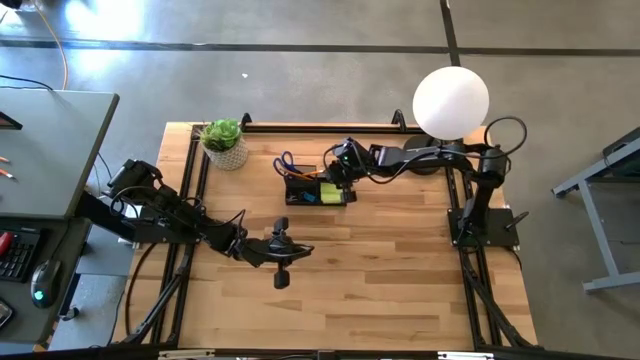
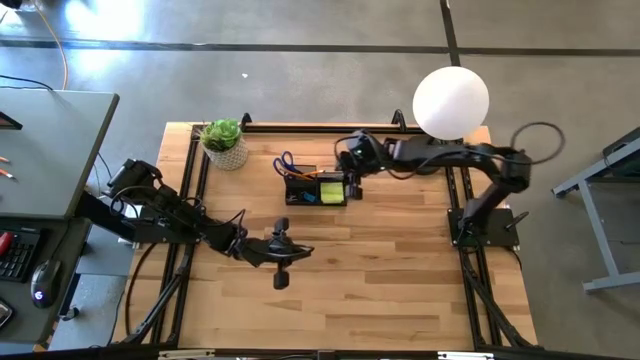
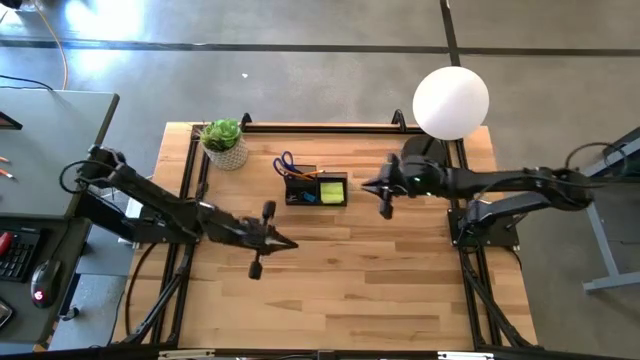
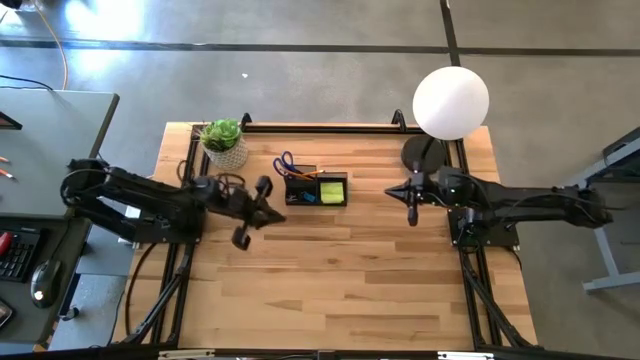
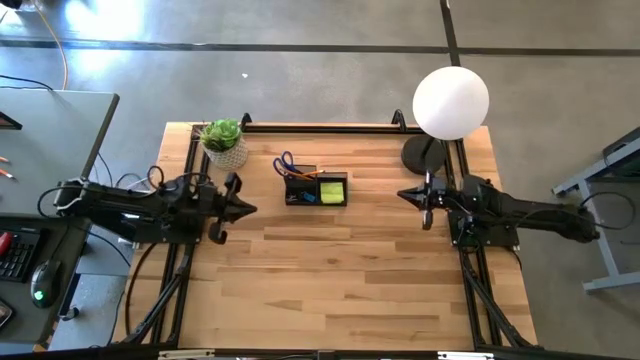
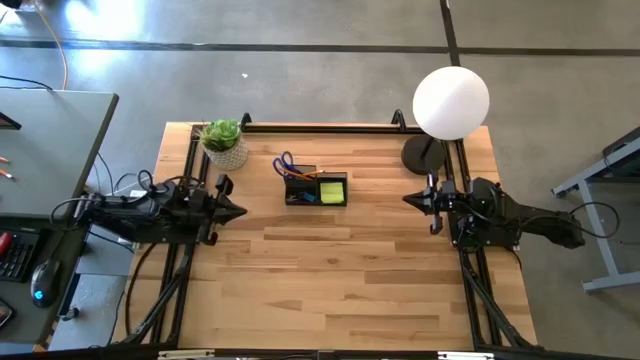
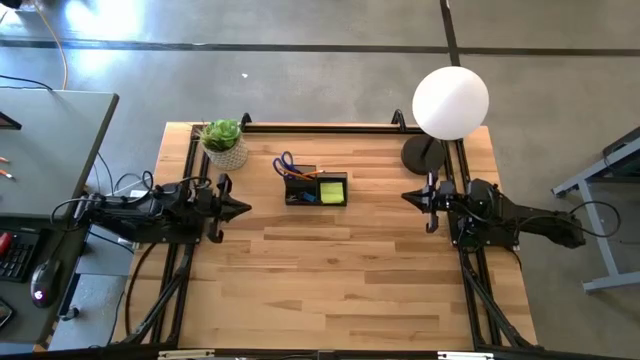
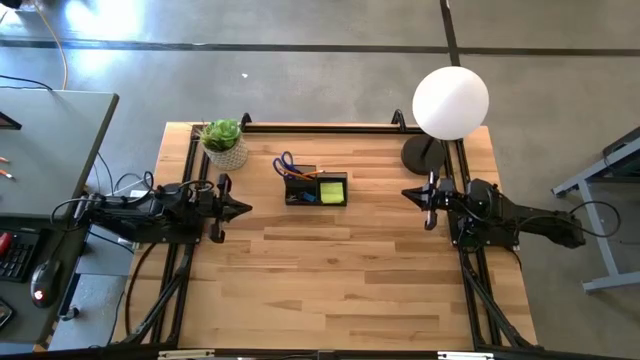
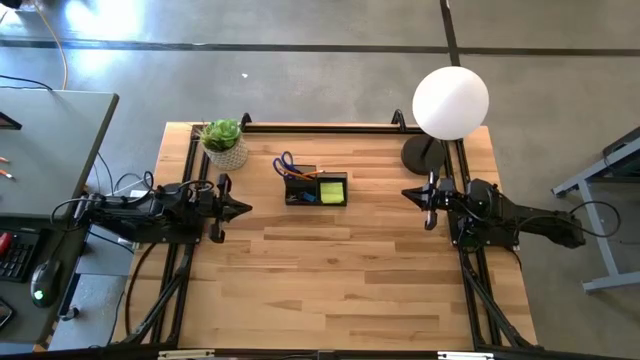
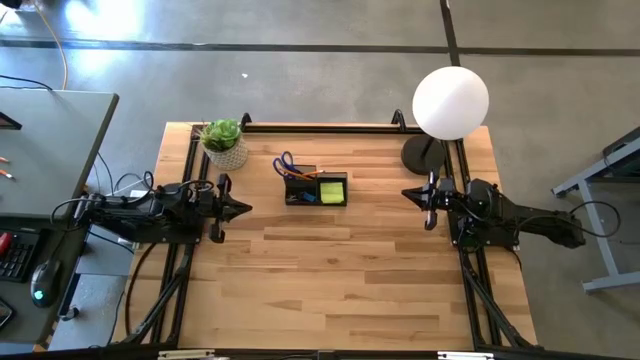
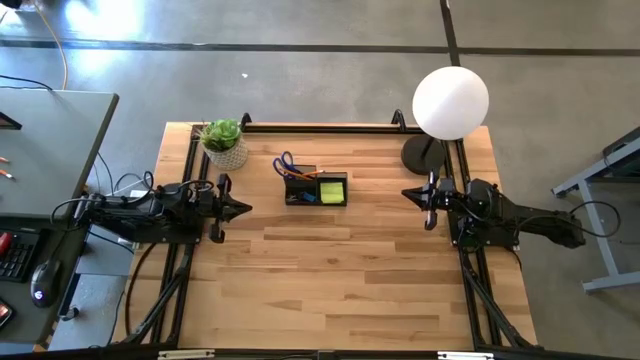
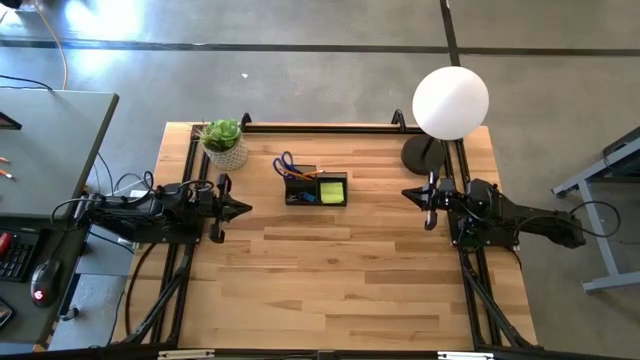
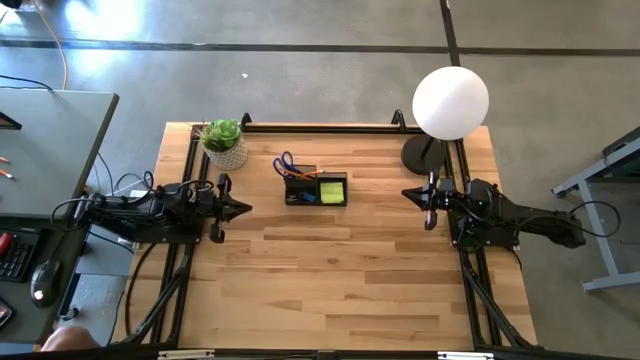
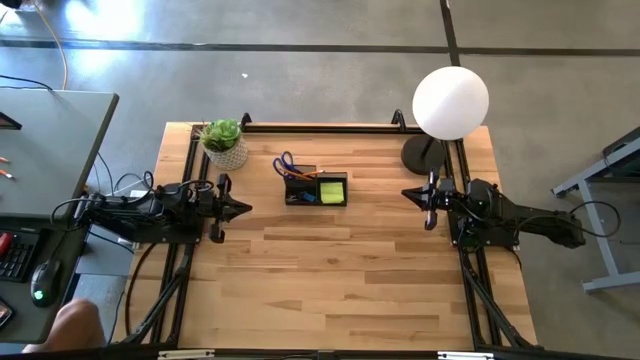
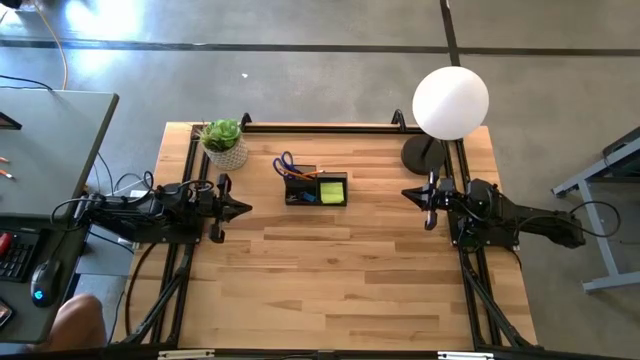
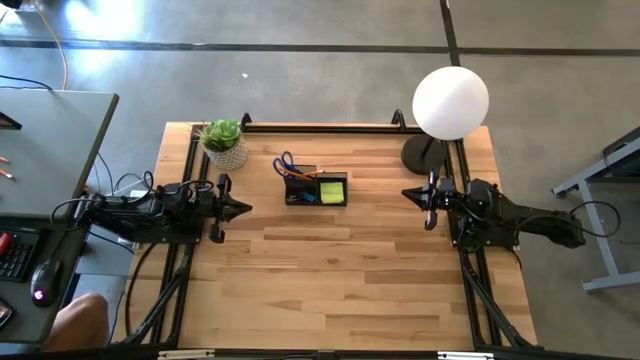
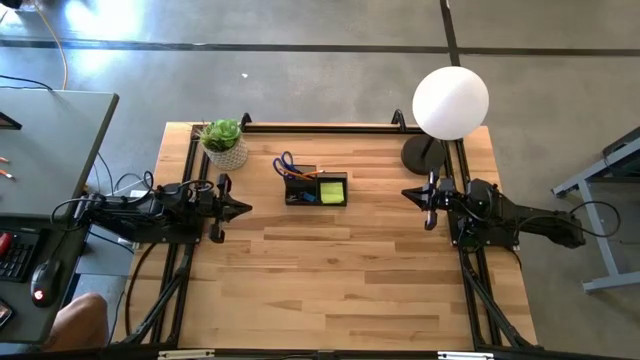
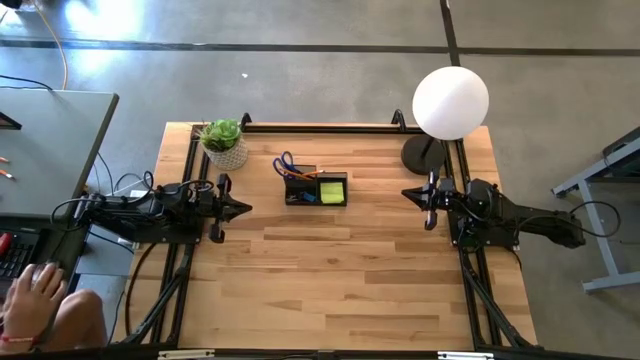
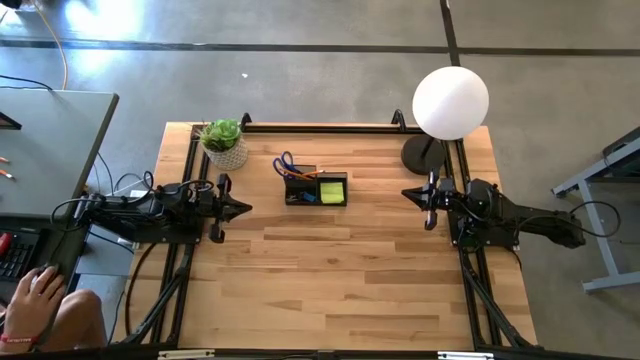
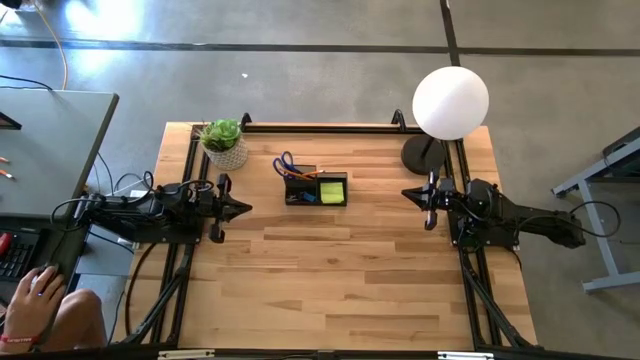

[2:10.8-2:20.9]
Task: Pick and place office supplies into organizer
Return to Home Position

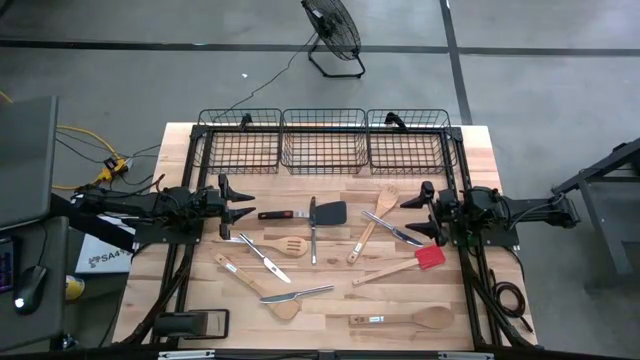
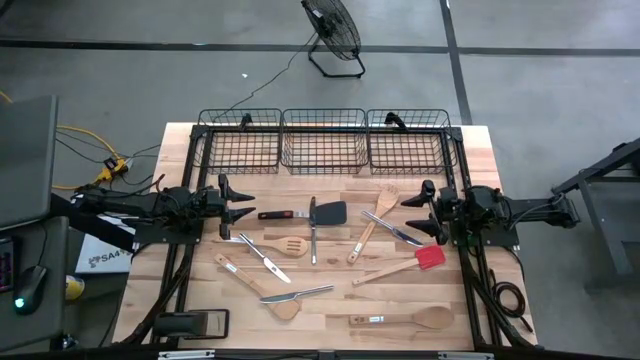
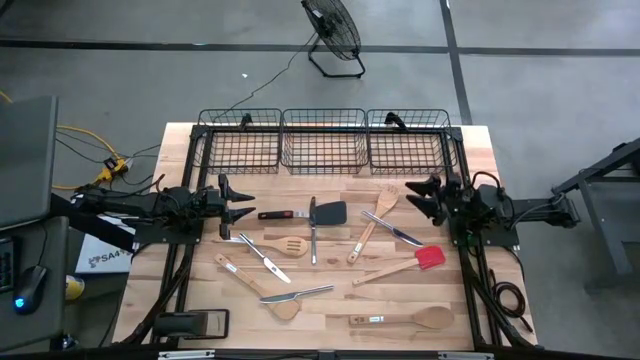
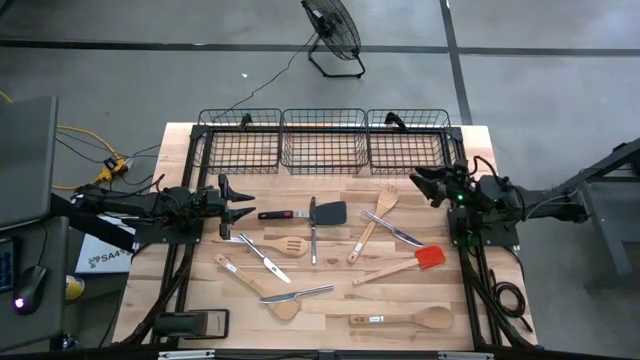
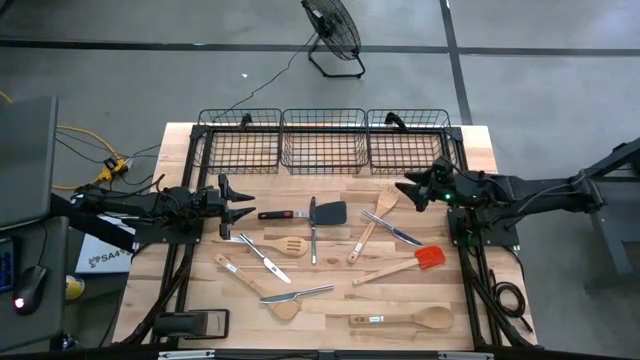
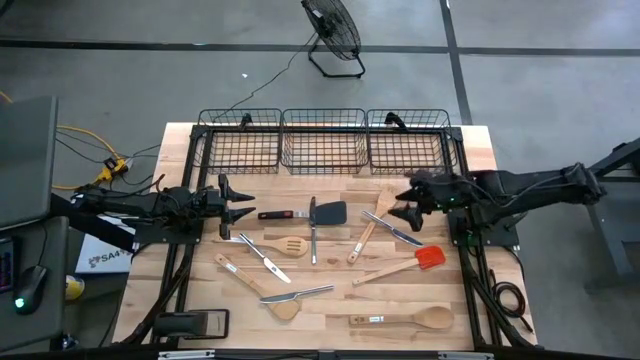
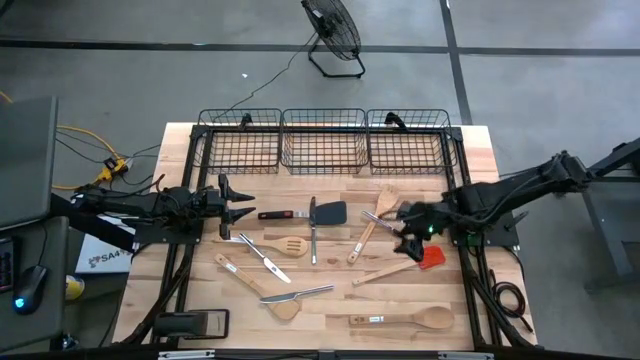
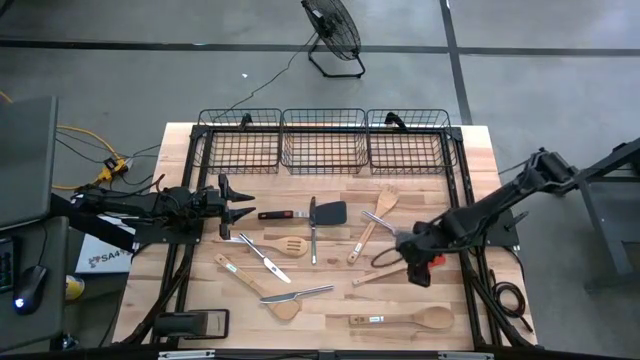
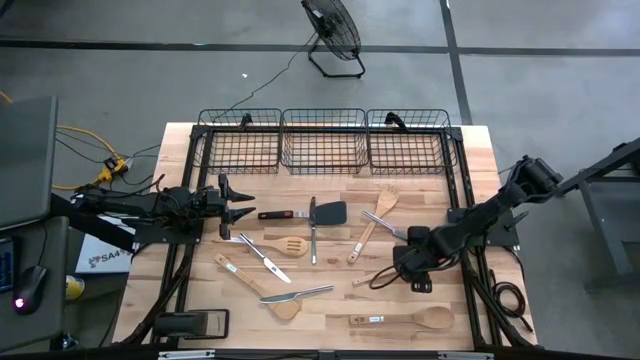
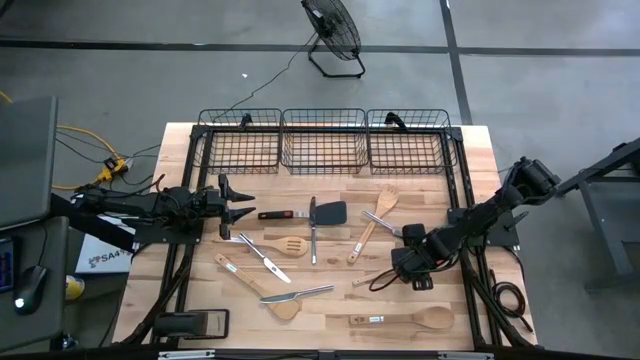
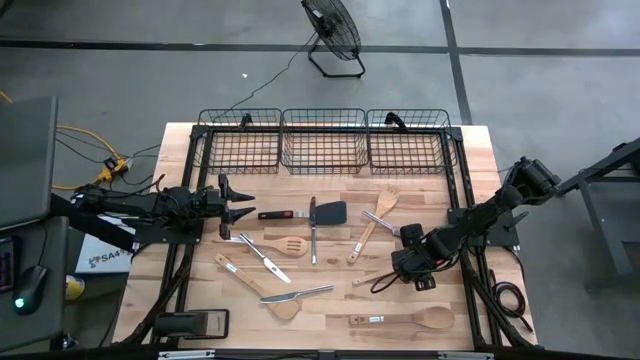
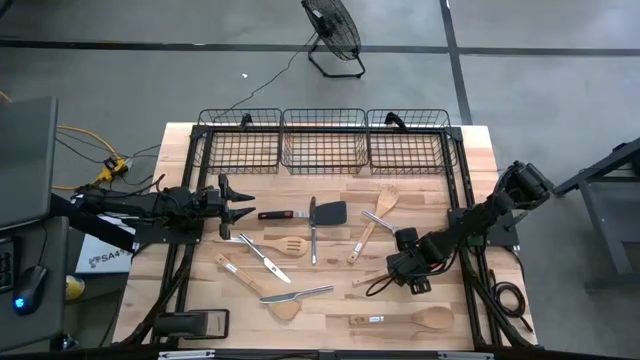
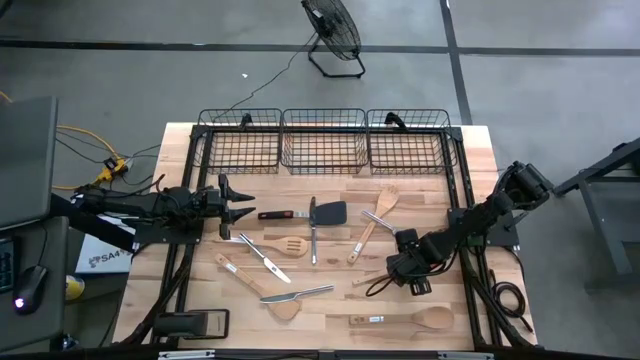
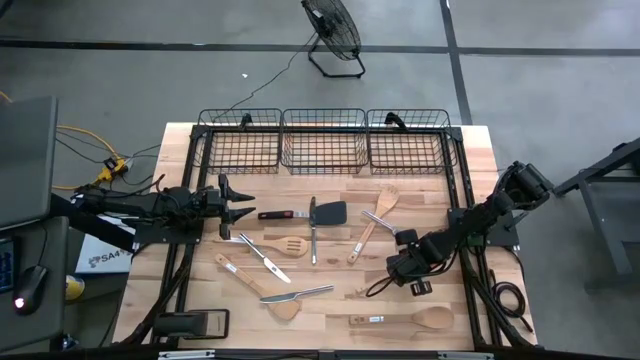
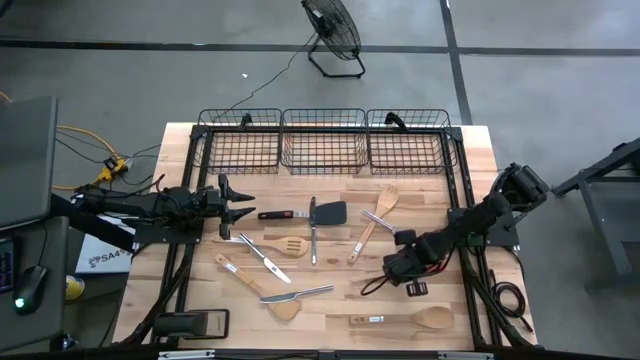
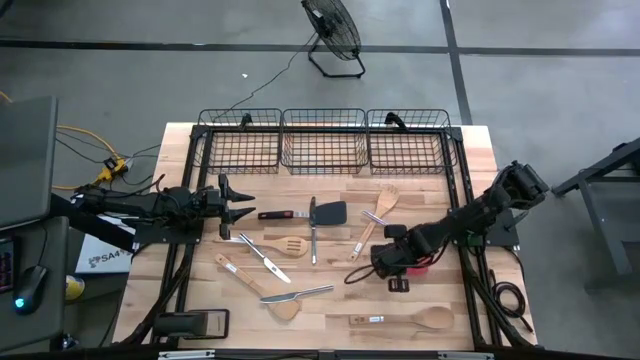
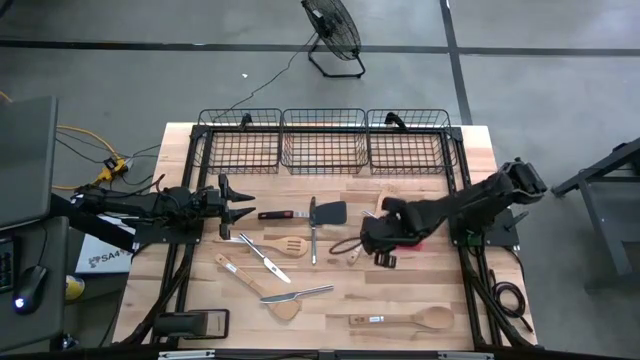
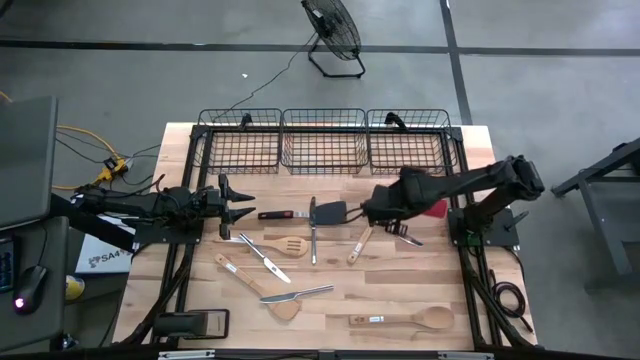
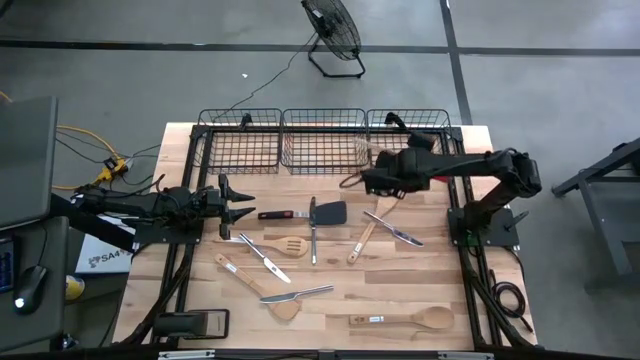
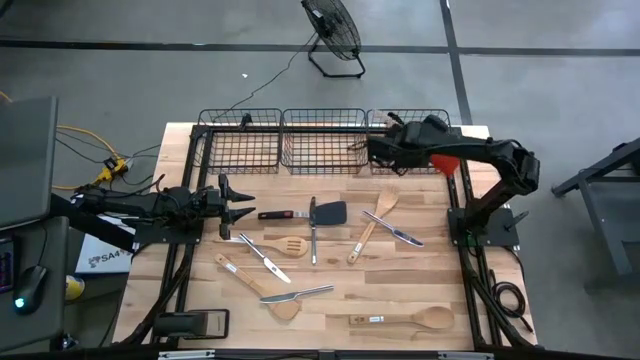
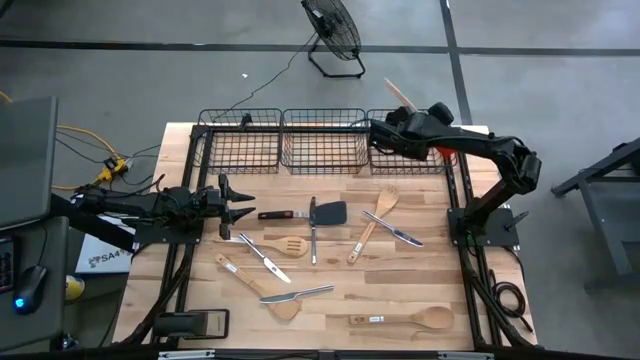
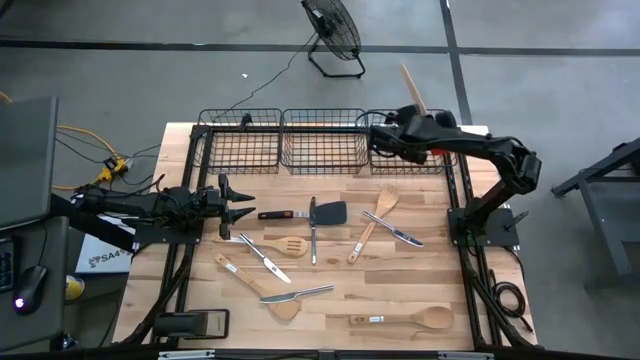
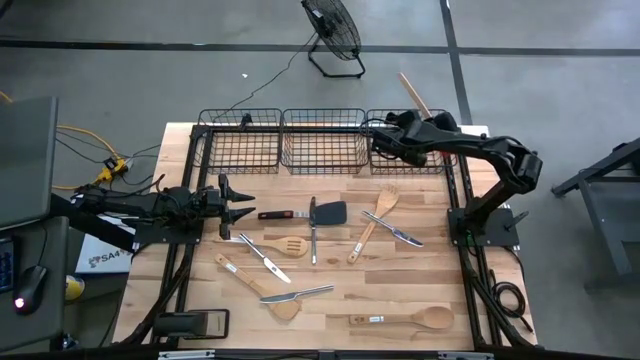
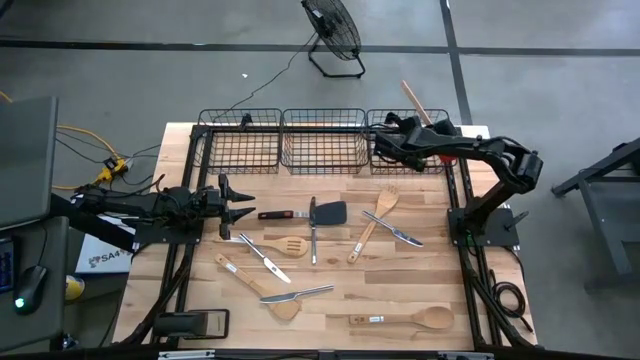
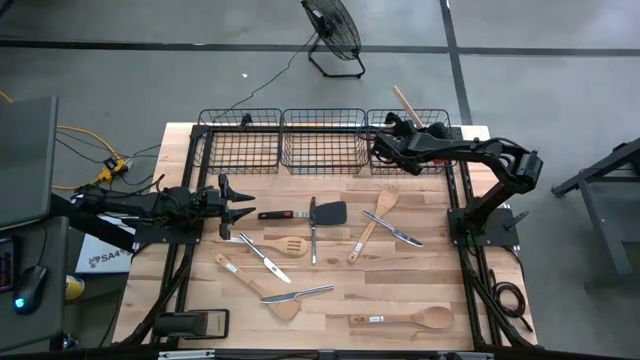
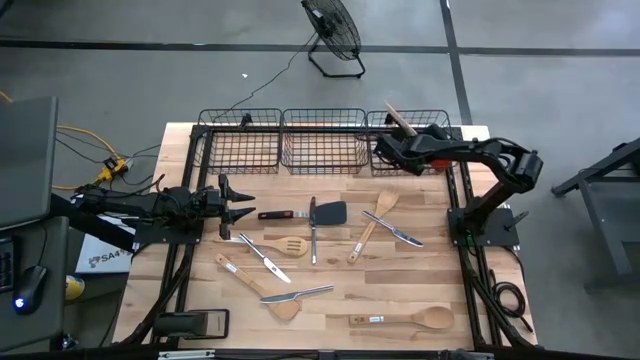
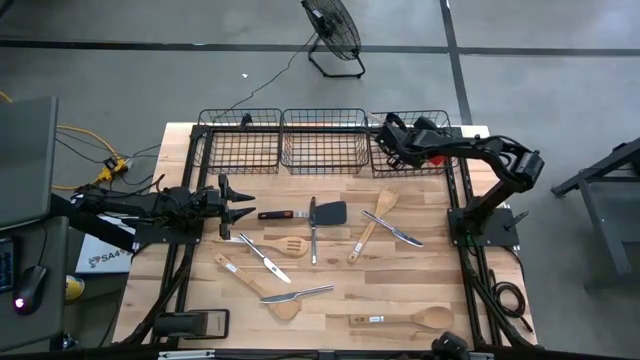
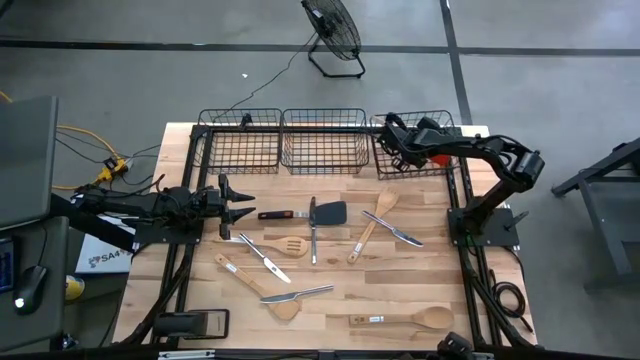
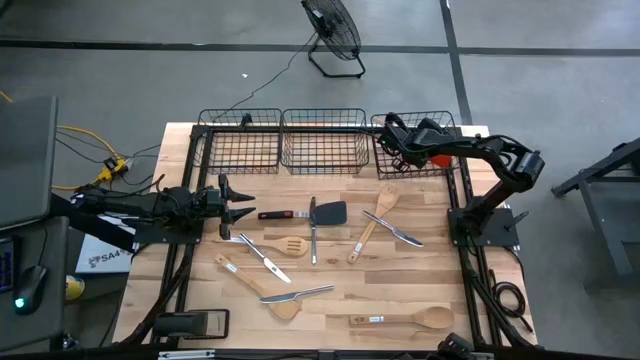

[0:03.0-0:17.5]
Task: Pick & Place Kitchen Items
Put the orange spatula into the right mesh basket
